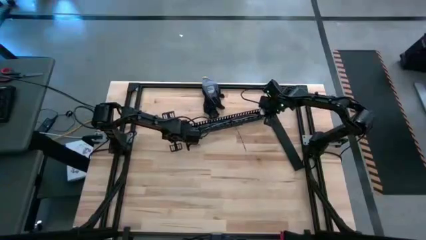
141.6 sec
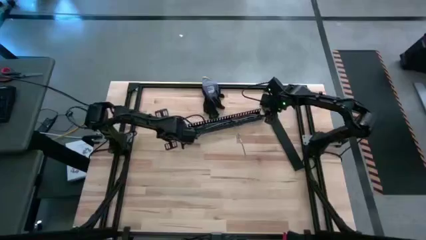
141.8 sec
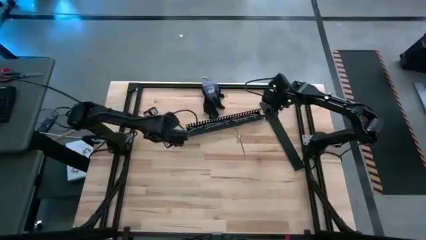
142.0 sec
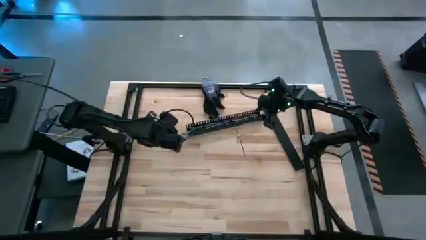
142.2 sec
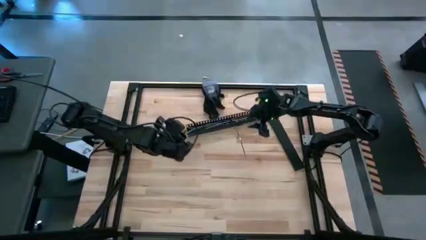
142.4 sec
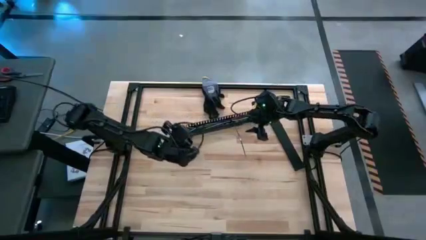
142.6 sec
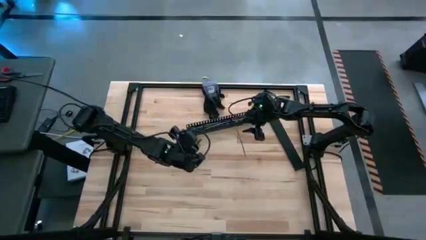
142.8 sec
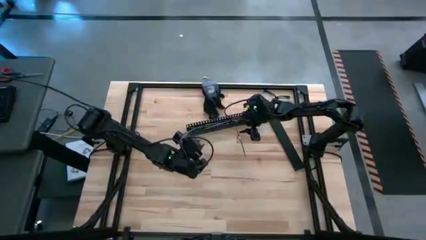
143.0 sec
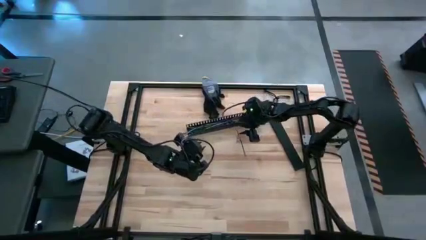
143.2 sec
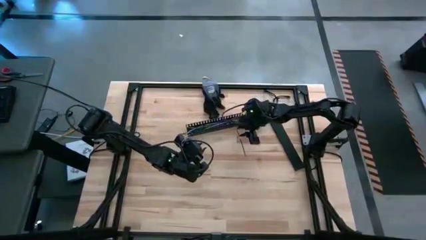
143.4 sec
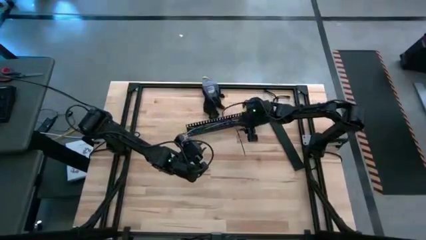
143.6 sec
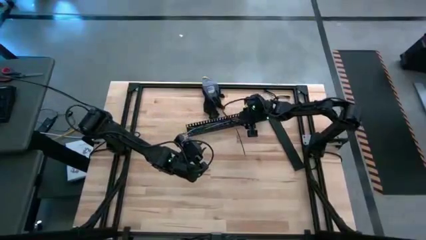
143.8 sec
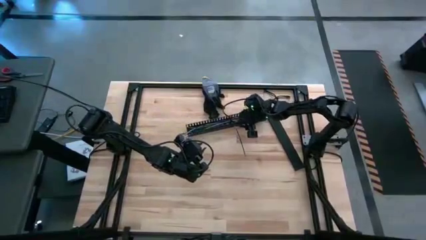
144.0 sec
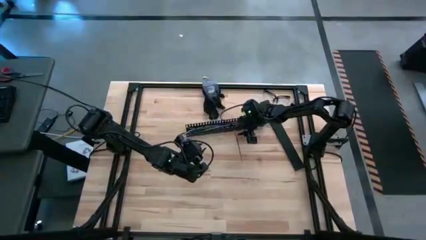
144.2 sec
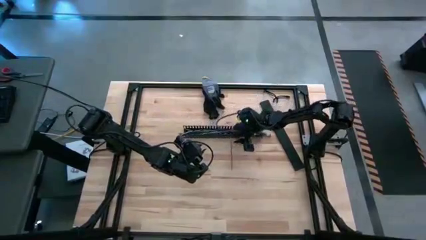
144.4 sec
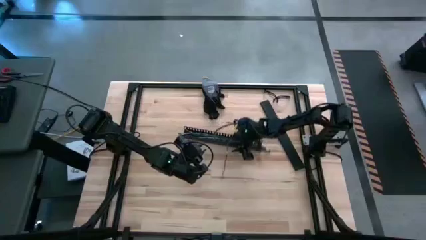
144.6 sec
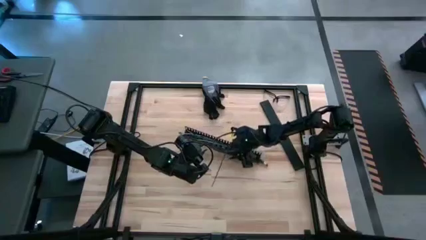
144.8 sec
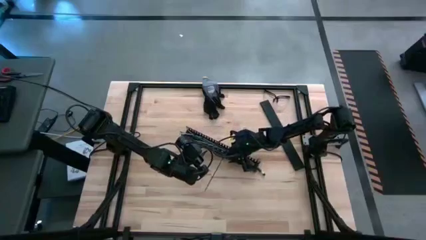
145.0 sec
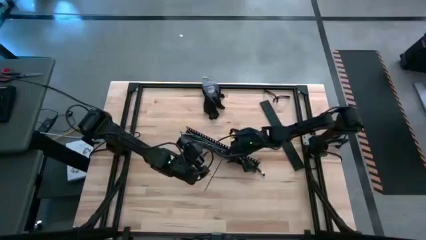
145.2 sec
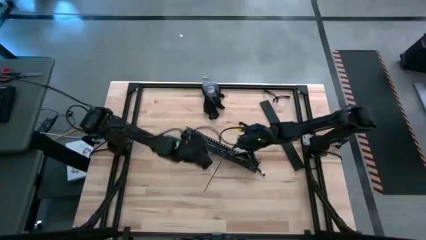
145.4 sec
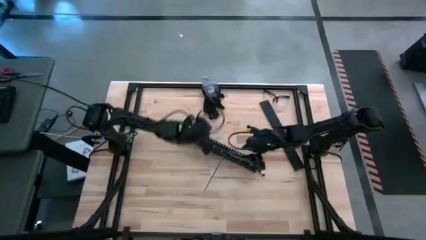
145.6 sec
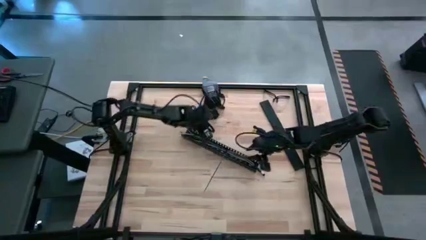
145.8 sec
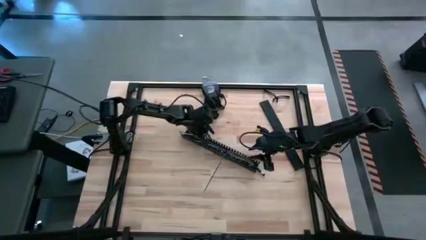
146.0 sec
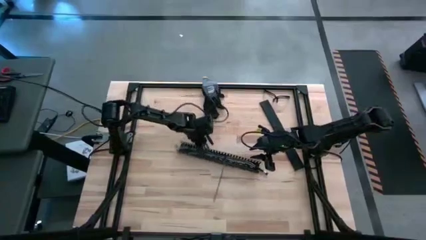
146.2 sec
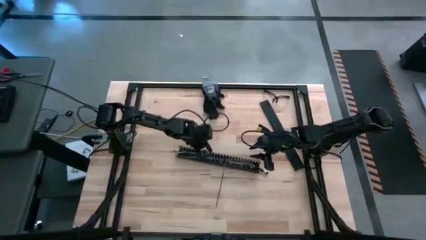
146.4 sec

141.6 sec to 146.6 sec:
Task: Ziptie cables
Move the black cable duct to the center of the table

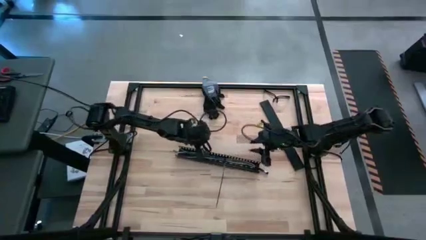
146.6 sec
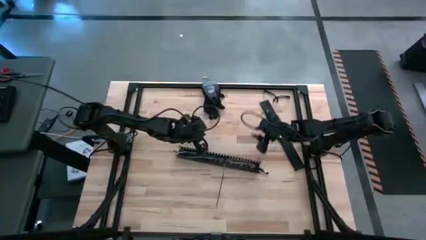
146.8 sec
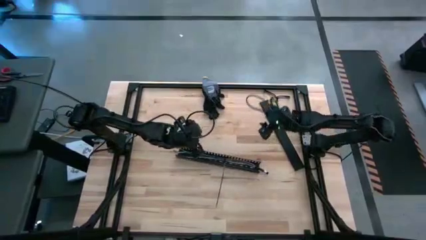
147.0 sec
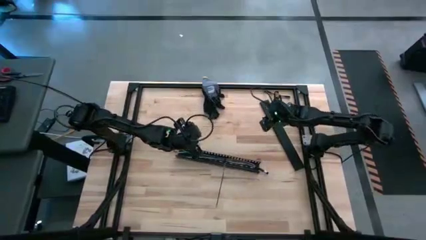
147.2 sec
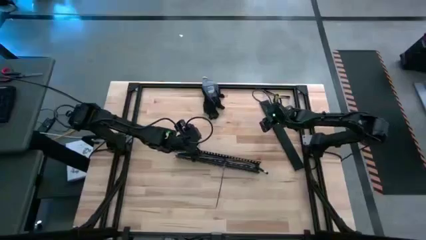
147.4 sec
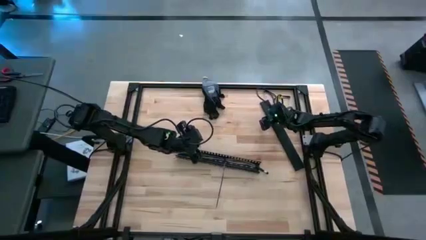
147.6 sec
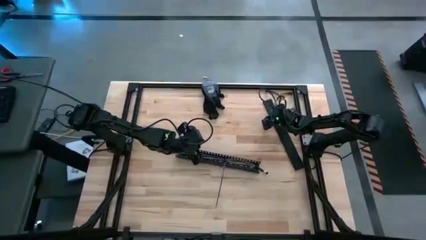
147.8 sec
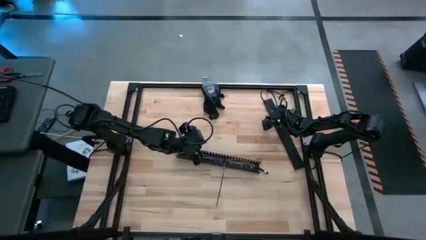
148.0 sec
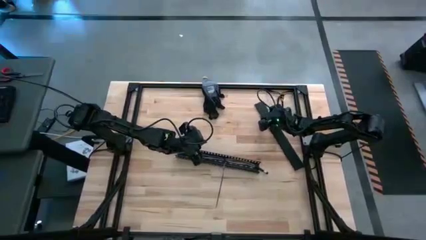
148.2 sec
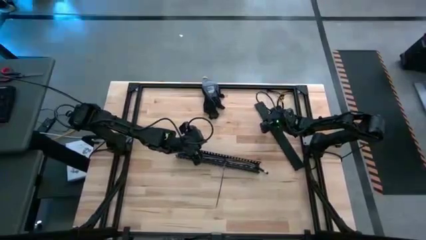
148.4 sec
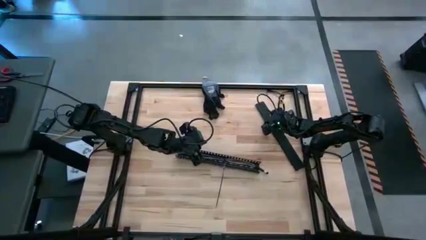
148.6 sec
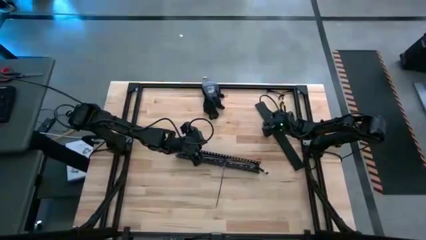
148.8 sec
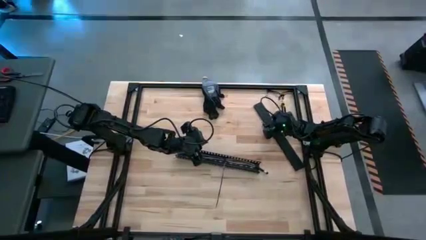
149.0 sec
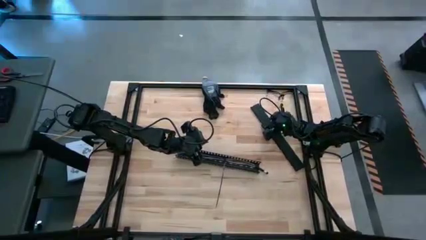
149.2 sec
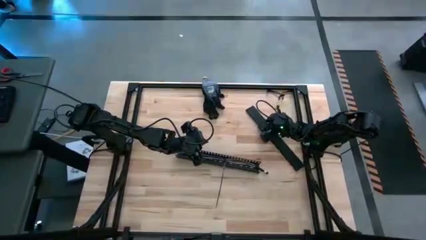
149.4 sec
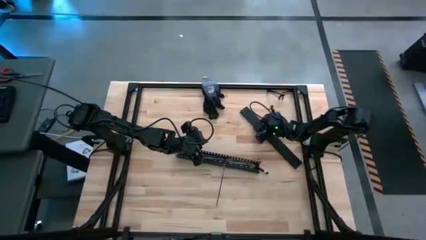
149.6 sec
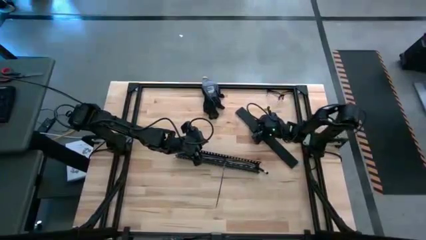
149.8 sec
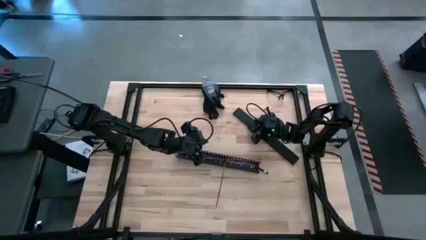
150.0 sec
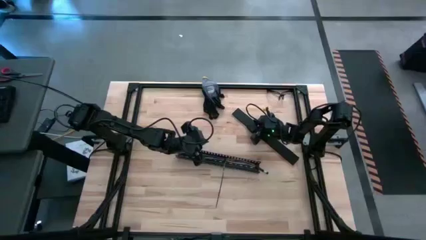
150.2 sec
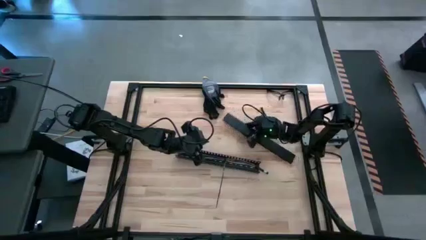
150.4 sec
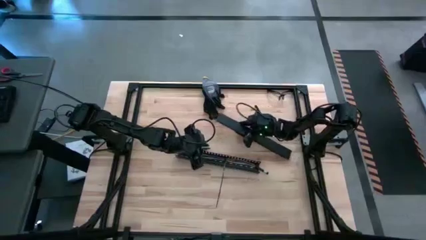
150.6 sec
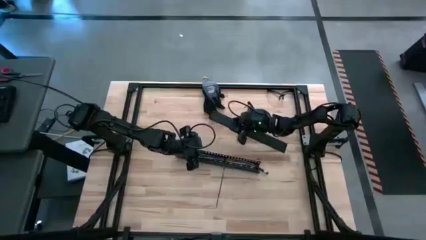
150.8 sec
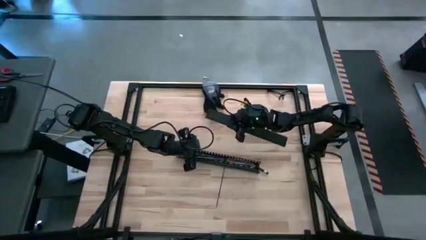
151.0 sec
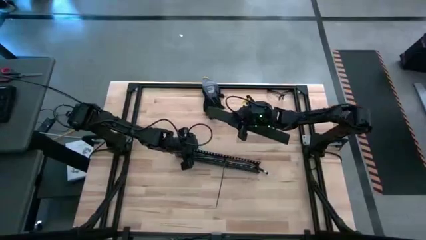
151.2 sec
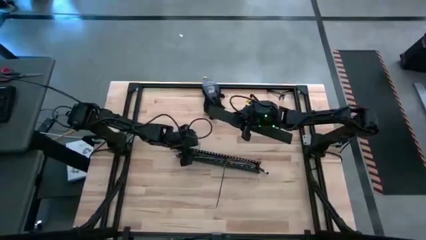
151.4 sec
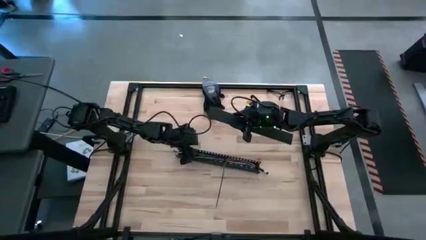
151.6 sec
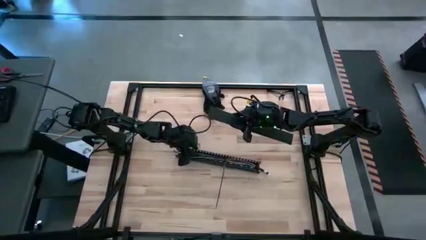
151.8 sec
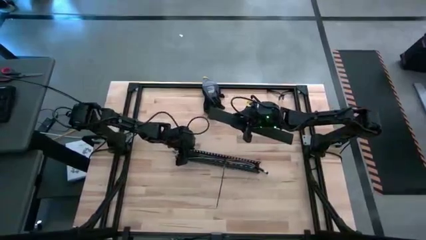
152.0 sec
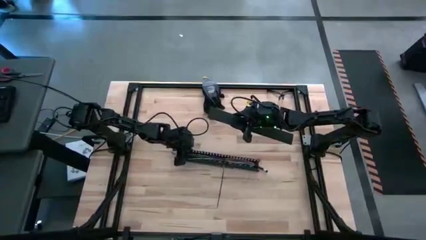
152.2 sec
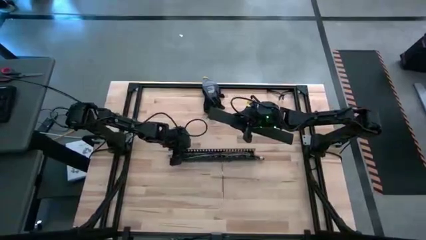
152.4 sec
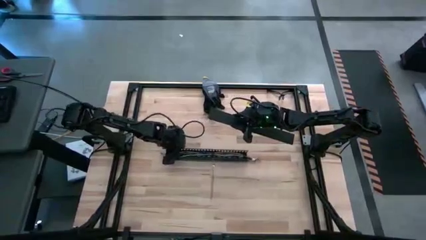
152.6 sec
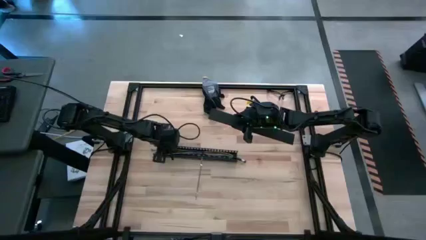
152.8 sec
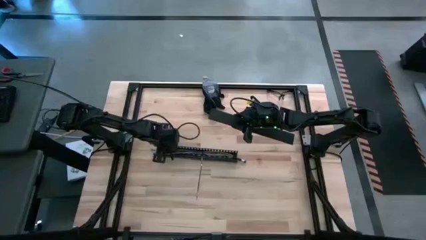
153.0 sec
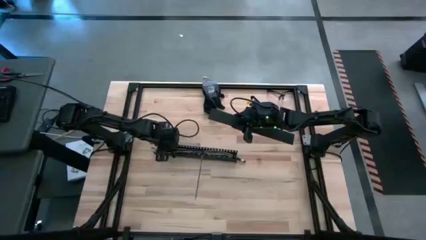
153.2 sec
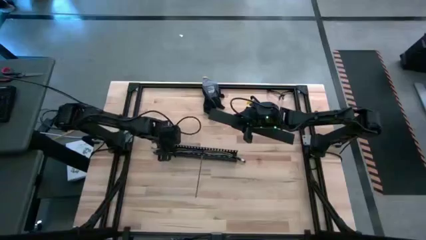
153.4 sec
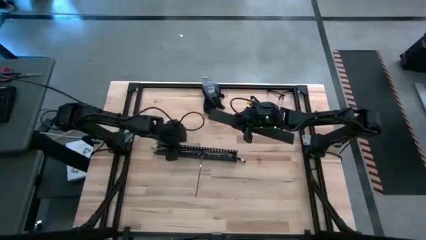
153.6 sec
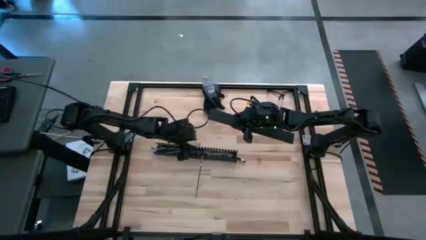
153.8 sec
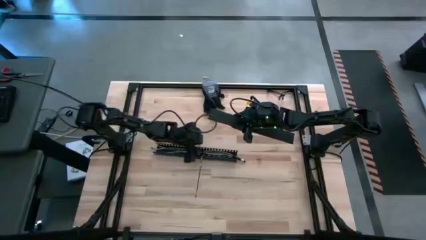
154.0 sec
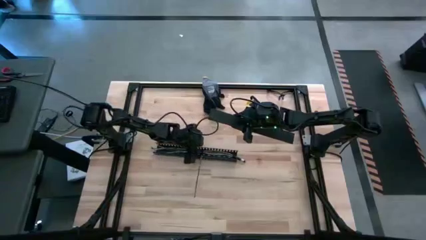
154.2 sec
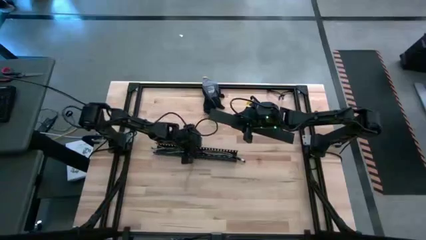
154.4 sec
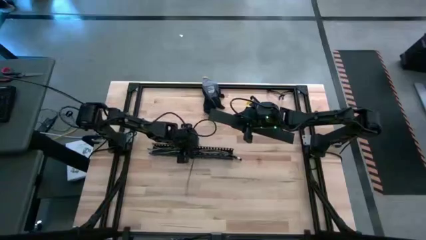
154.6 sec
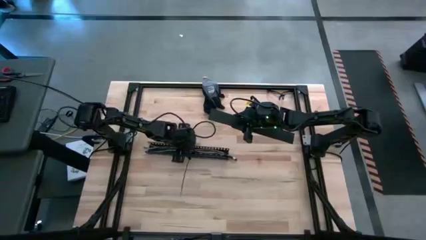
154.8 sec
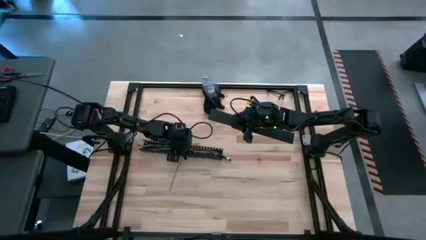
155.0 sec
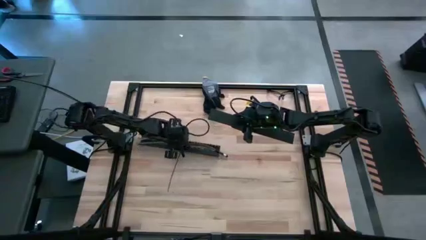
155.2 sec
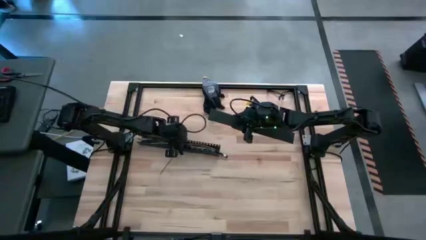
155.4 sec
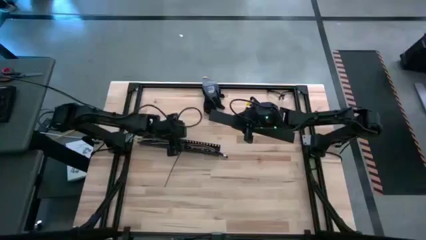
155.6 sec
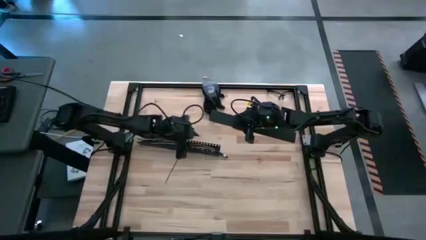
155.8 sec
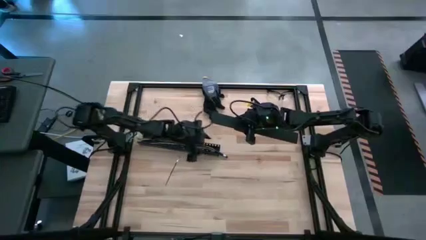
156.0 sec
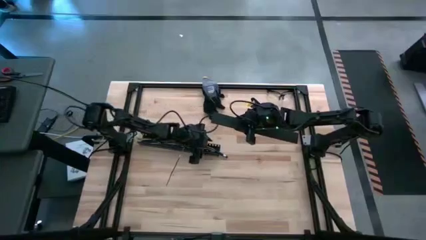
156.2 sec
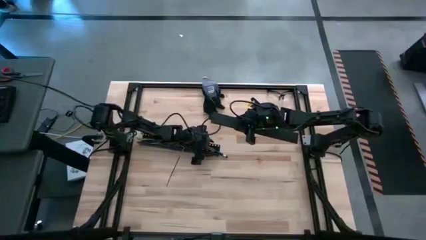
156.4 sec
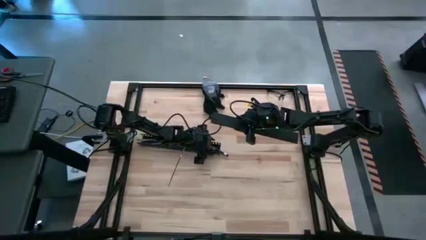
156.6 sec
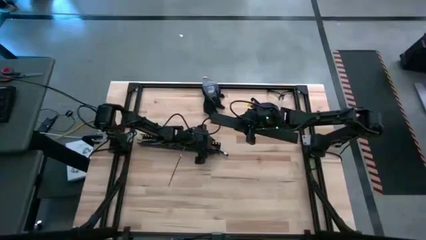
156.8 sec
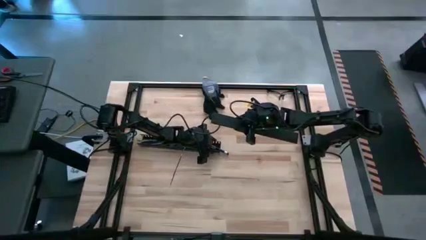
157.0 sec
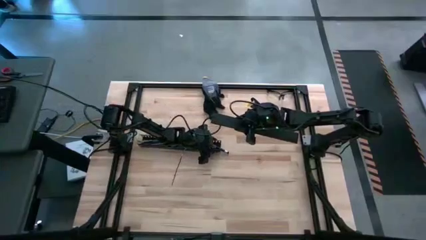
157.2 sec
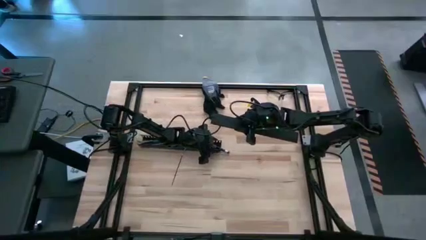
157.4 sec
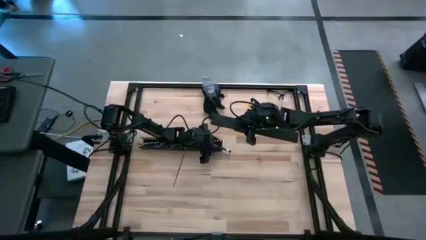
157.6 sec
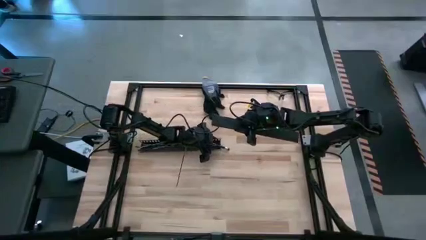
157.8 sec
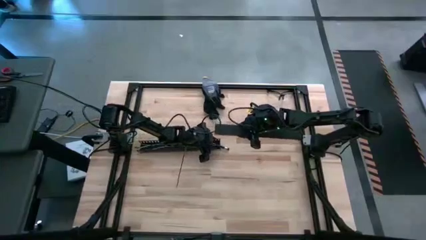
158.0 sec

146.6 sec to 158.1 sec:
Close the black cable duct
